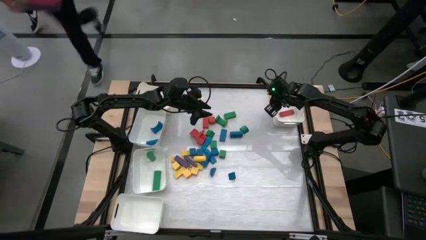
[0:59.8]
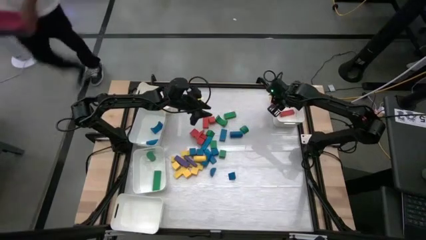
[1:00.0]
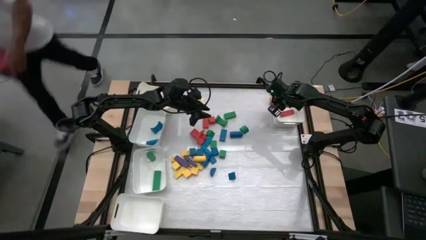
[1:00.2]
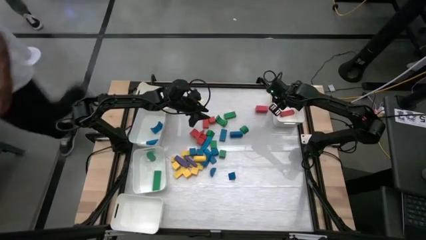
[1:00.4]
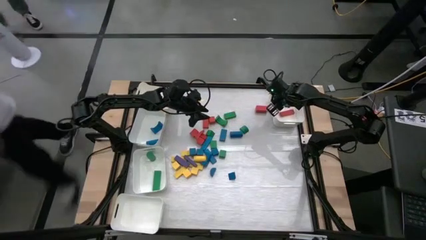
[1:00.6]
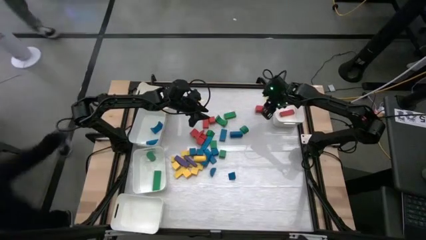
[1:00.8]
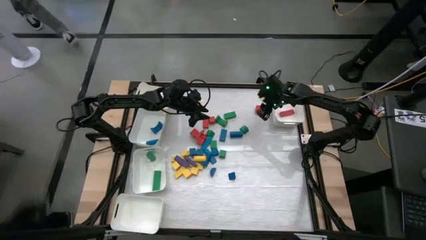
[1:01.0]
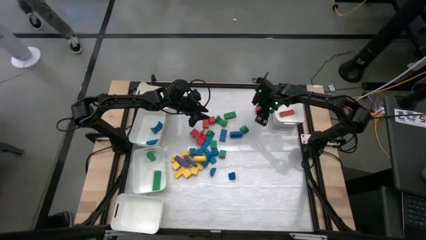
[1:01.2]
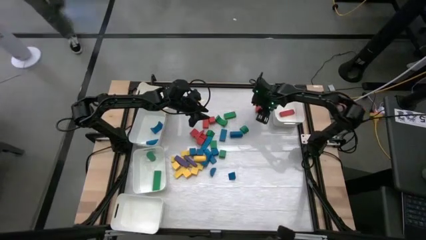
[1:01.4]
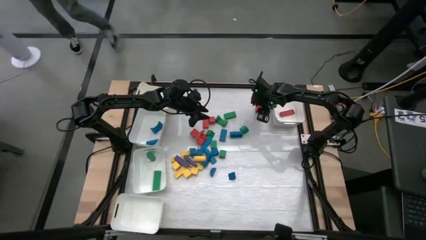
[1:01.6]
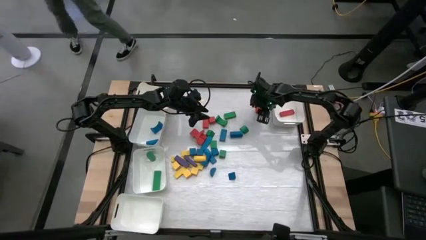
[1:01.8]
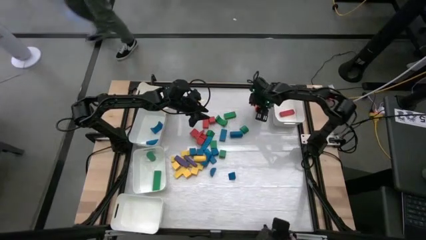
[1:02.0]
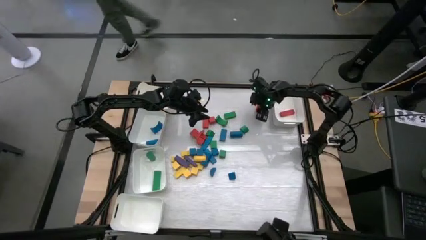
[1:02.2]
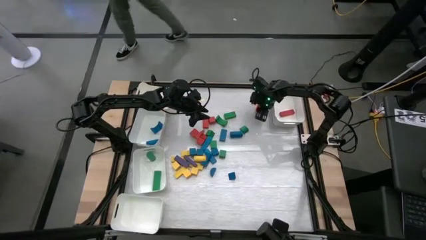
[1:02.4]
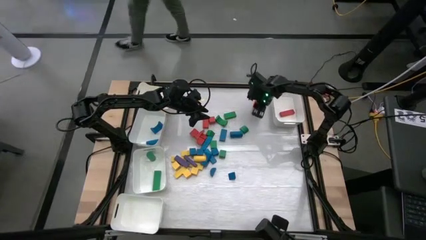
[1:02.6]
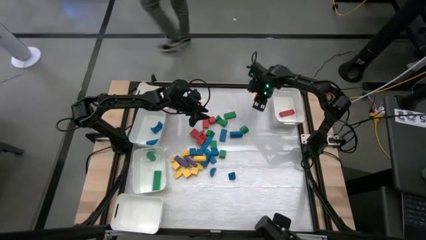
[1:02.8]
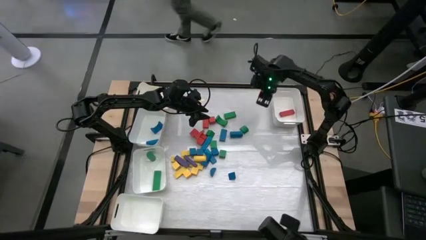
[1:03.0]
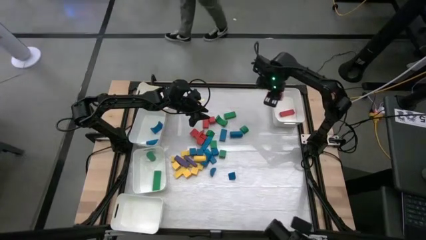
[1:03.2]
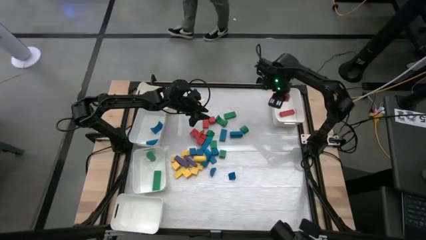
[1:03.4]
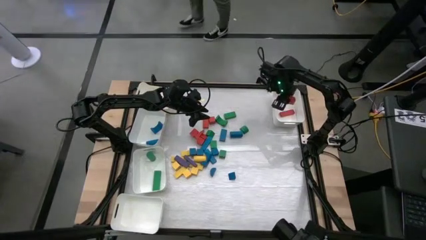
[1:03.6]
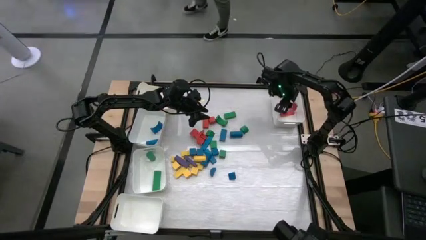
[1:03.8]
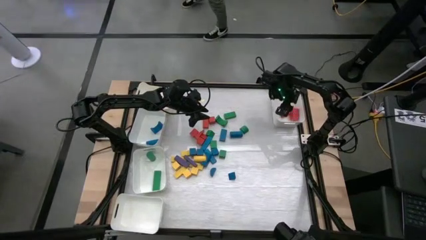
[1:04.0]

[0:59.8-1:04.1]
Task: Sort blocks
Put the red wooden block into the top right white bin

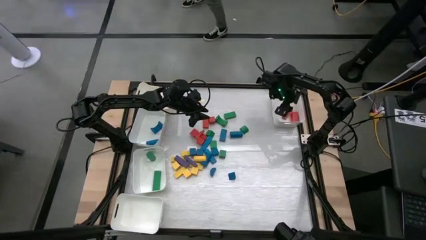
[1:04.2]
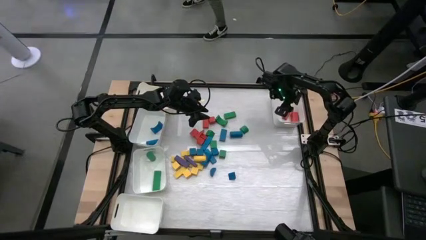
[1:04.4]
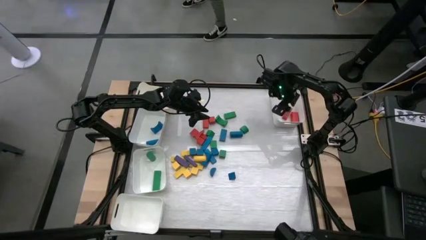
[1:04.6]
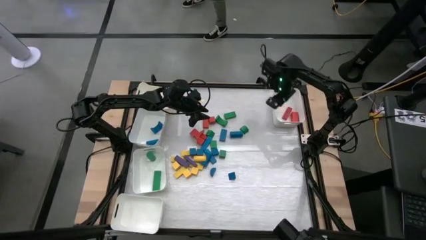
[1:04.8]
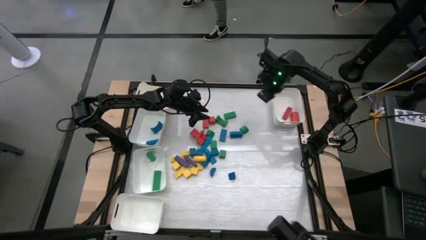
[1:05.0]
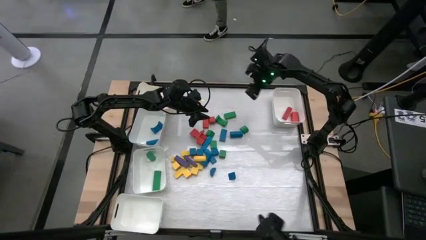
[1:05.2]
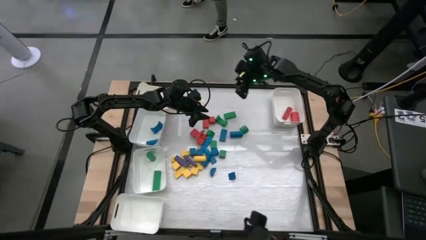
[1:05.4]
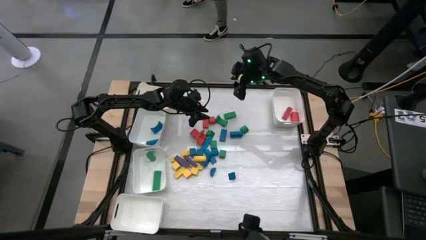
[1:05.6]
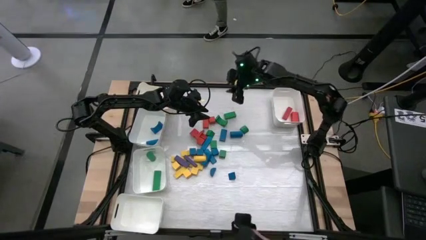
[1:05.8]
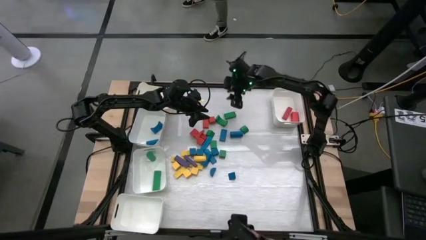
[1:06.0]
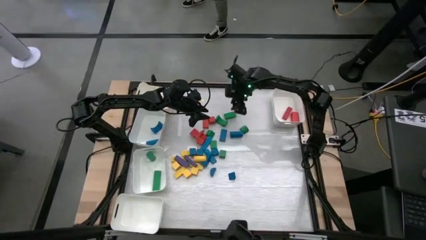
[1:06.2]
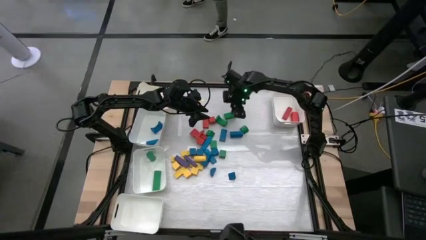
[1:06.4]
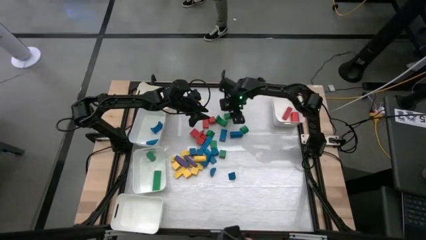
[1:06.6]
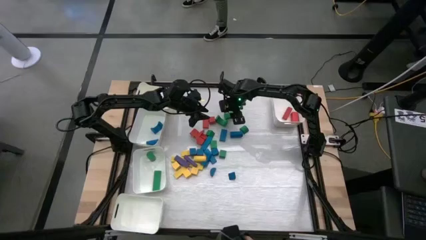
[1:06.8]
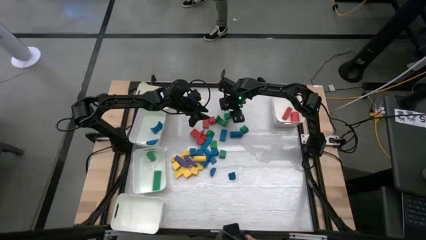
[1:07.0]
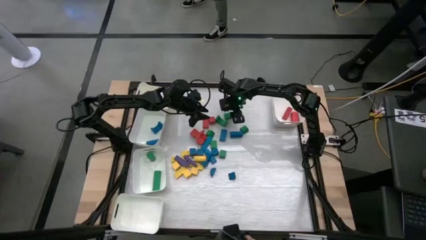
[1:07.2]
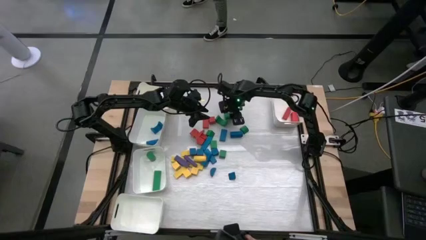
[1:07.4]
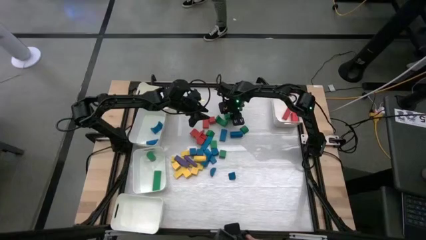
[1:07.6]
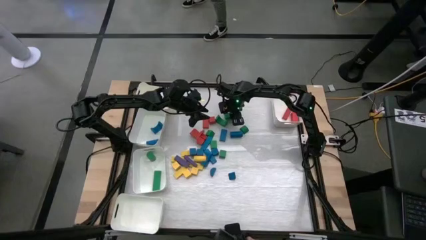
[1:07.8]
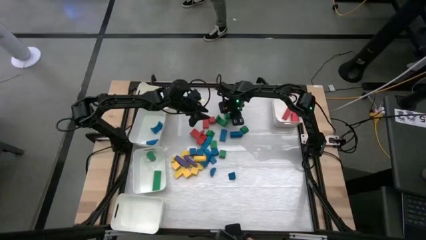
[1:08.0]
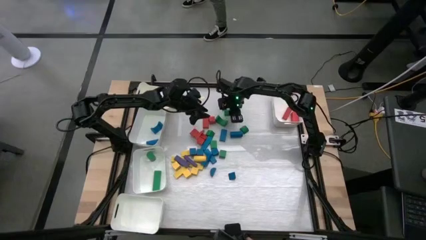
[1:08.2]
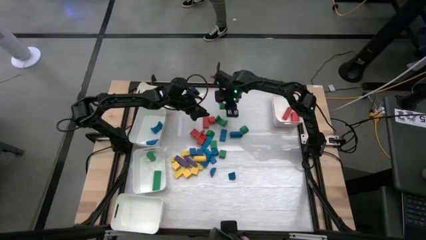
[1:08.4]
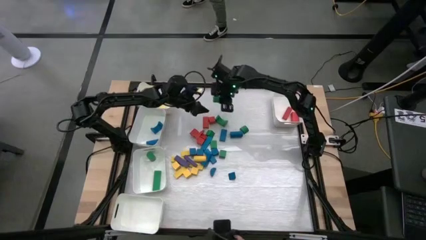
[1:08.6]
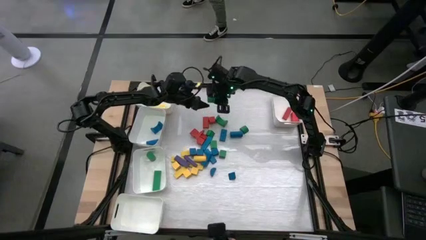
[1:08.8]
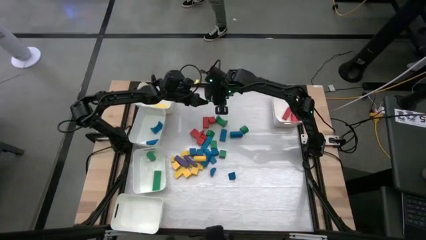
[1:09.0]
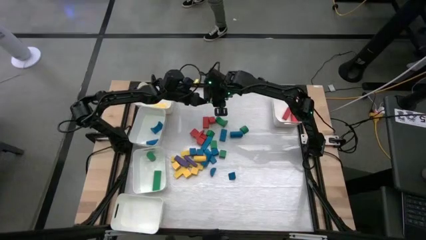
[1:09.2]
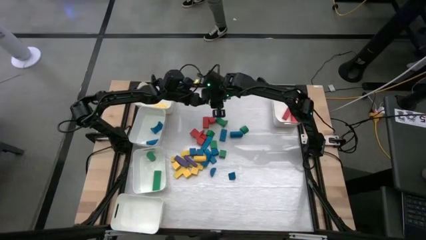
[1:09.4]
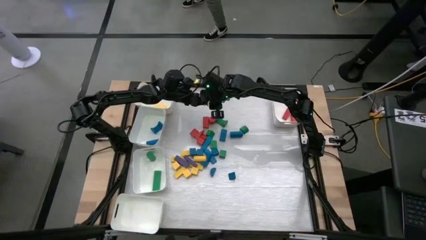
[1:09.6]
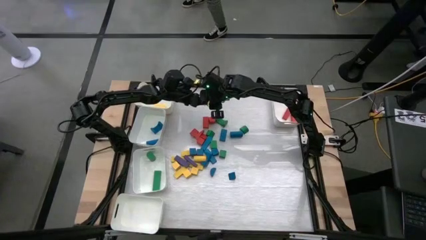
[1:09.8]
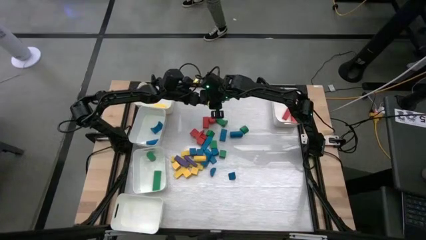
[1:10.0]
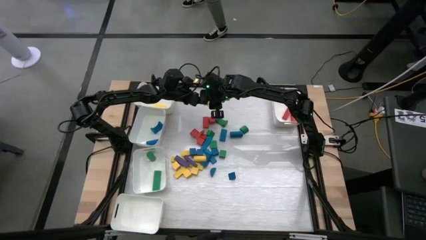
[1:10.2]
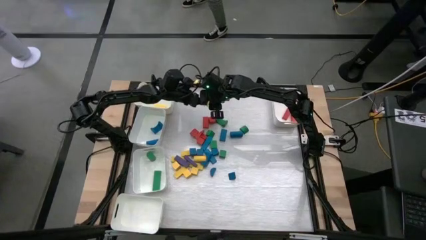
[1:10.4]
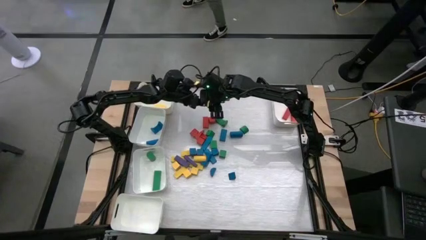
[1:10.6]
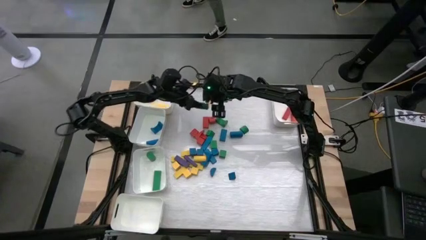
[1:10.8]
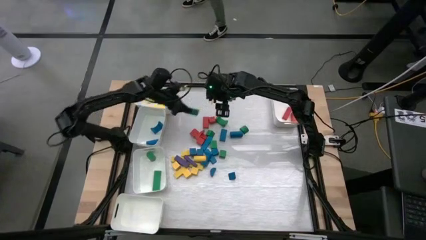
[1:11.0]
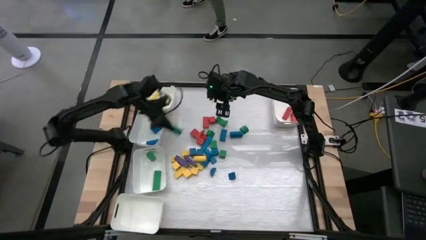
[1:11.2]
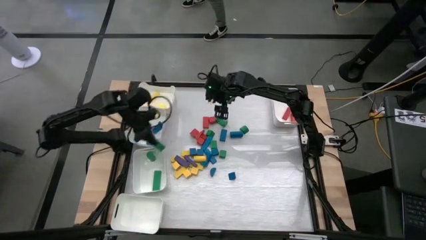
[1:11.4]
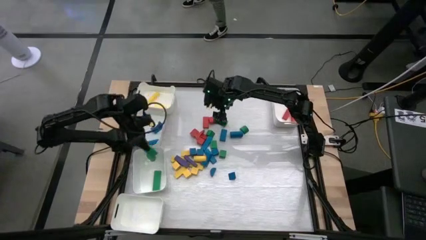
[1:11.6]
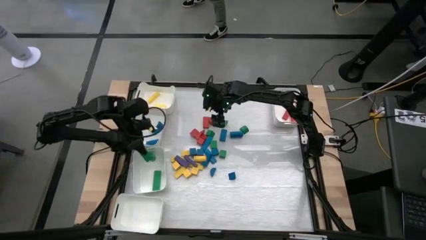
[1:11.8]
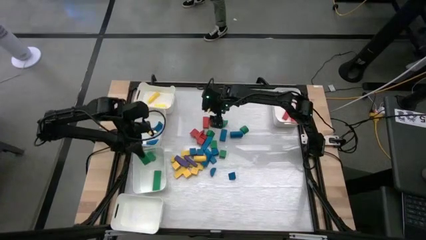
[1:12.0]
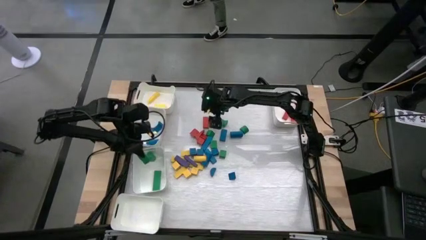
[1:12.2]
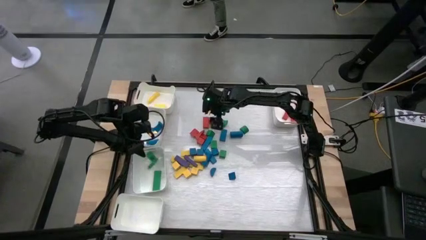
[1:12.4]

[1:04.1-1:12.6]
Put the green wooden block into the bottom middle left white bin

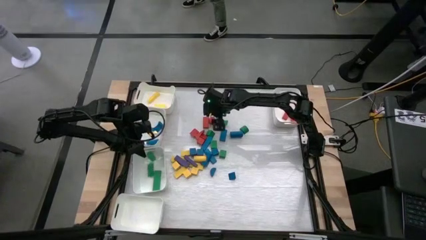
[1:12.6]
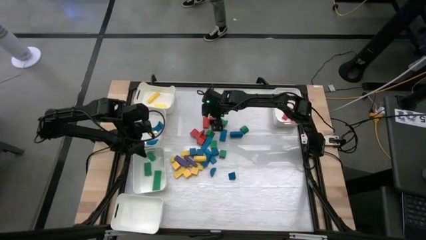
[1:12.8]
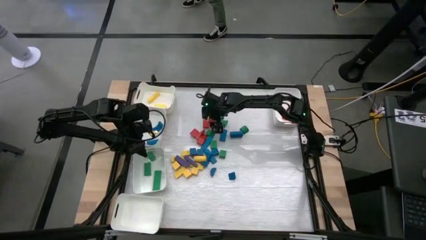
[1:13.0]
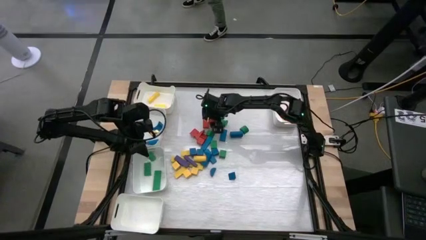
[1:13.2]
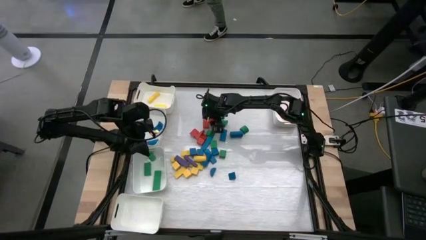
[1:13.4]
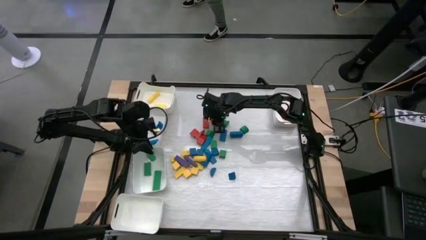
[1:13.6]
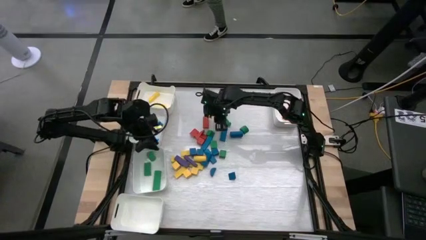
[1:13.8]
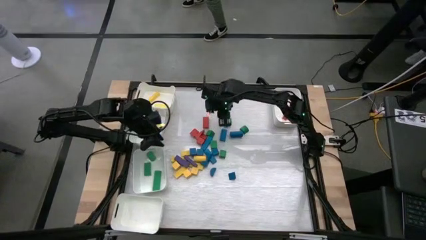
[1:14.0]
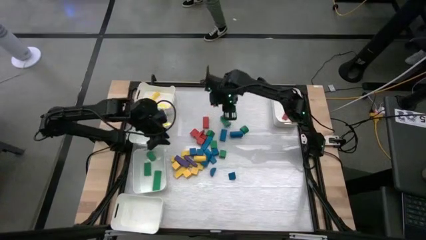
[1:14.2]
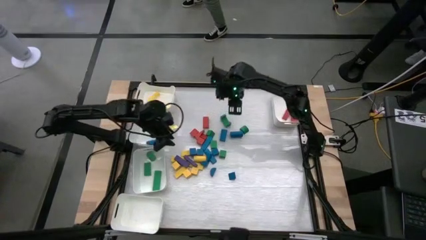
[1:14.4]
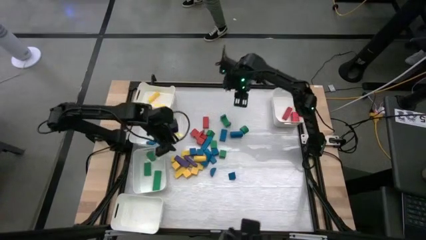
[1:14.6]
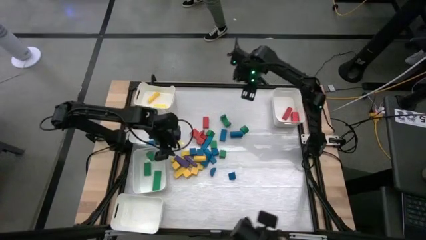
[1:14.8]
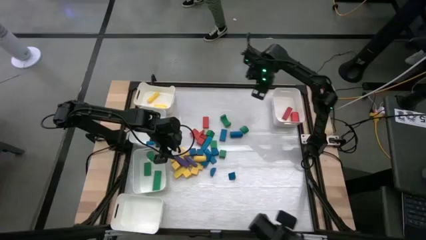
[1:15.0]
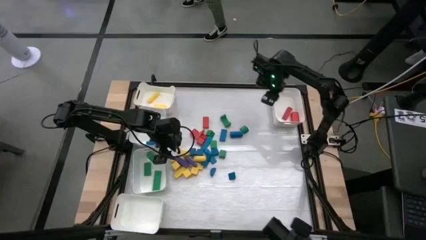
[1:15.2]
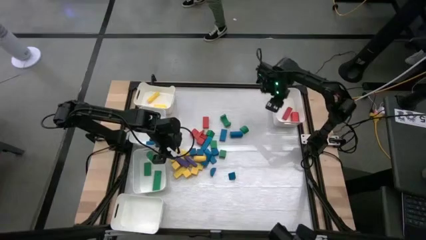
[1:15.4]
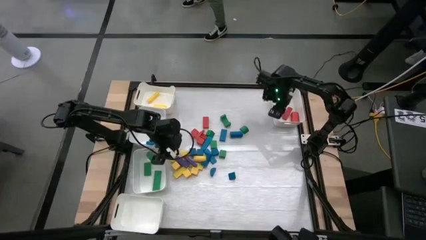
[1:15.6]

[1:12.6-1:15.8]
Put the red wooden block into the top right white bin

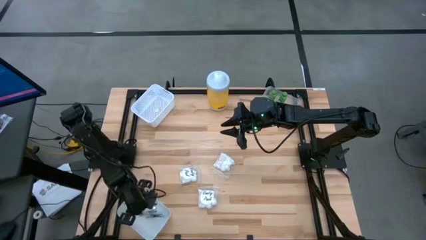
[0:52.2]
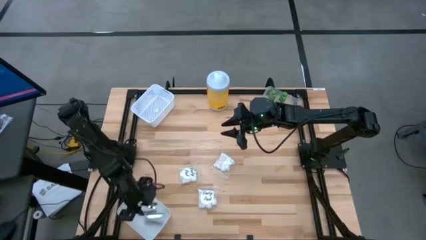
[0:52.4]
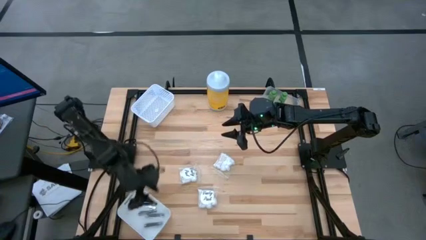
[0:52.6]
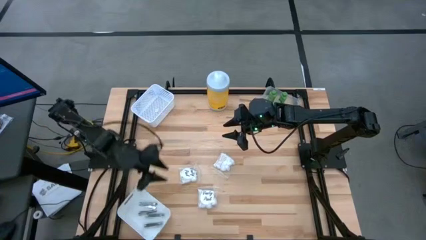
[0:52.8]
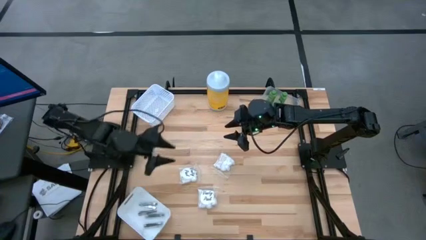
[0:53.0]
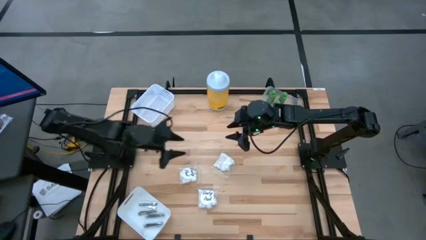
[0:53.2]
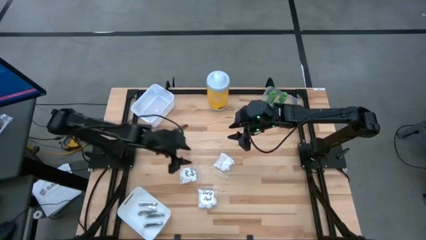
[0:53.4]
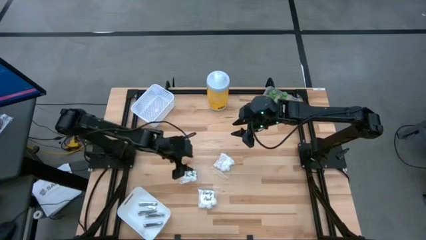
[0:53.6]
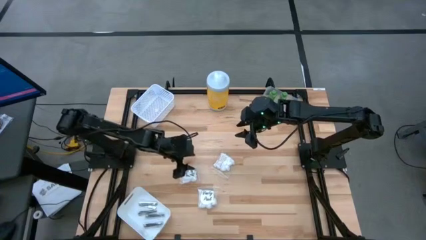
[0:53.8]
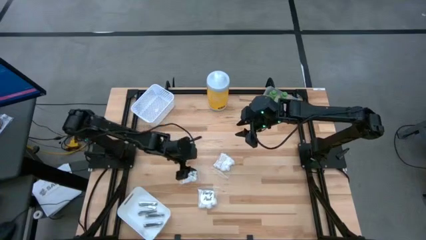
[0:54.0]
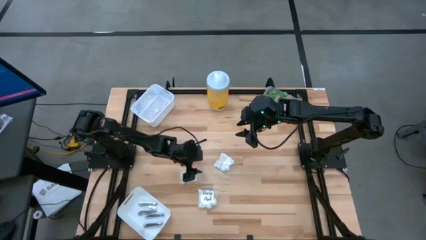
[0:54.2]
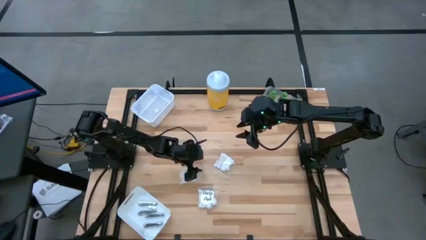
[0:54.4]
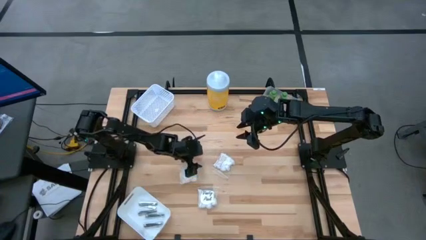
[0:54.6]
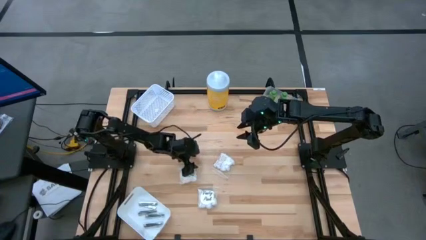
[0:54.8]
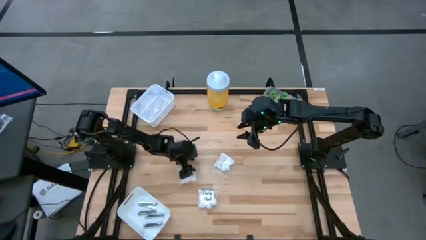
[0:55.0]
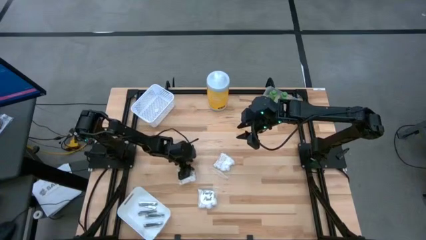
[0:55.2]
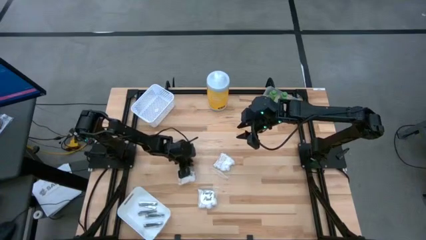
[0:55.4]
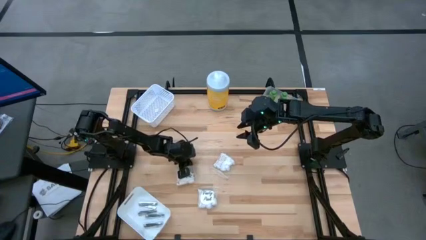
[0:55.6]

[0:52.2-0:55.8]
Task: Pick & Place Travel size toiletries
Put the white cotton pack into the white basket
